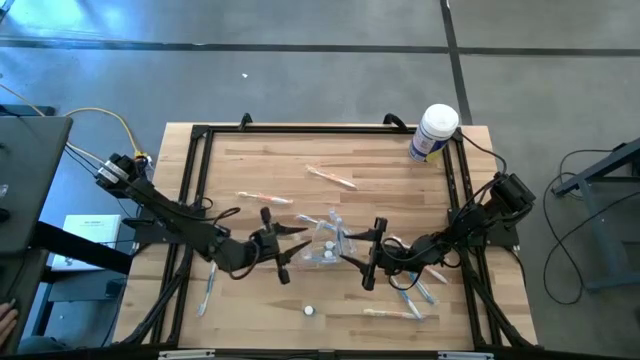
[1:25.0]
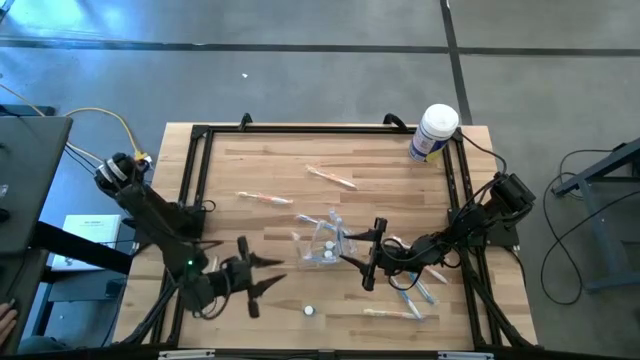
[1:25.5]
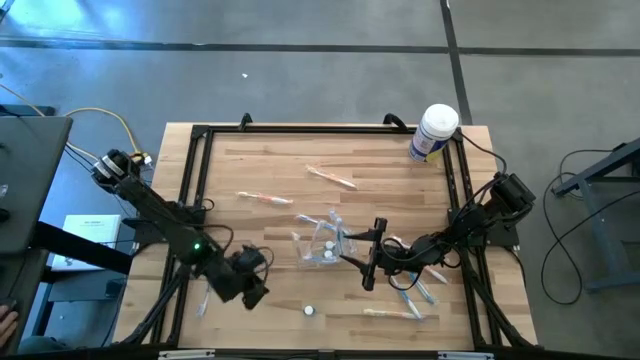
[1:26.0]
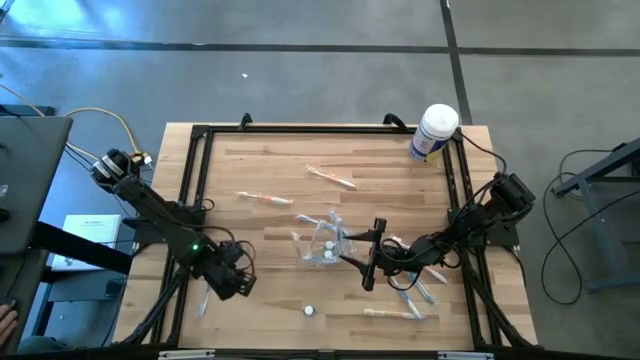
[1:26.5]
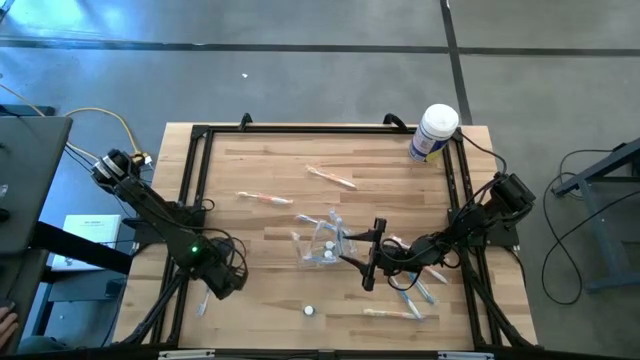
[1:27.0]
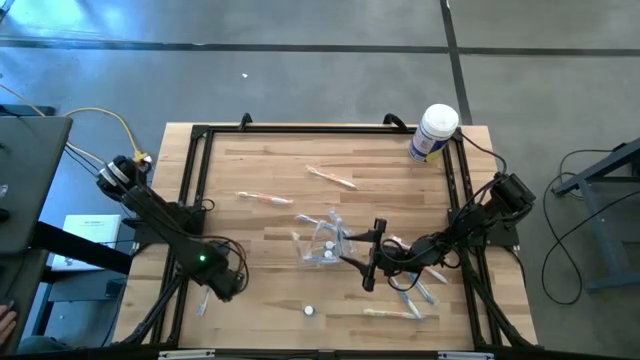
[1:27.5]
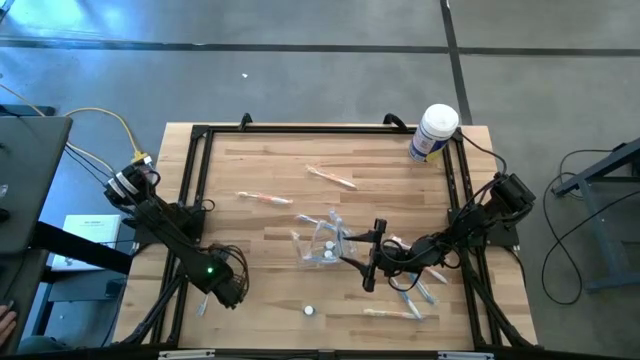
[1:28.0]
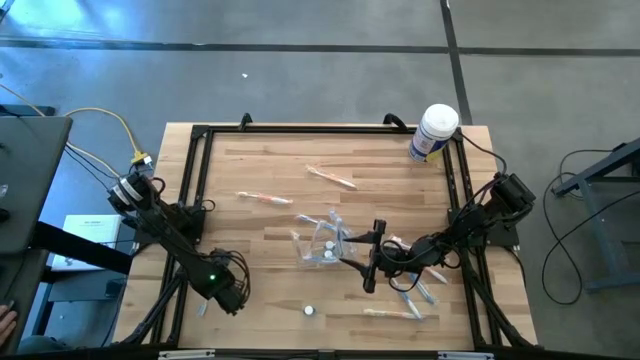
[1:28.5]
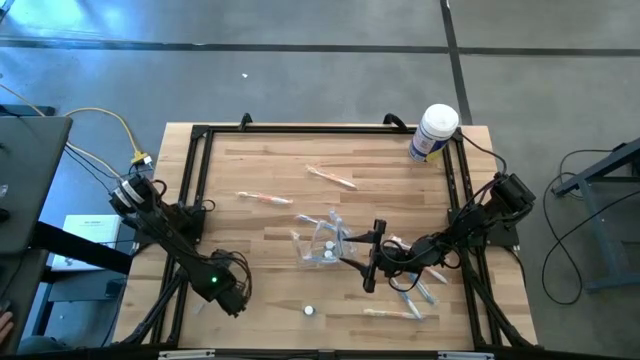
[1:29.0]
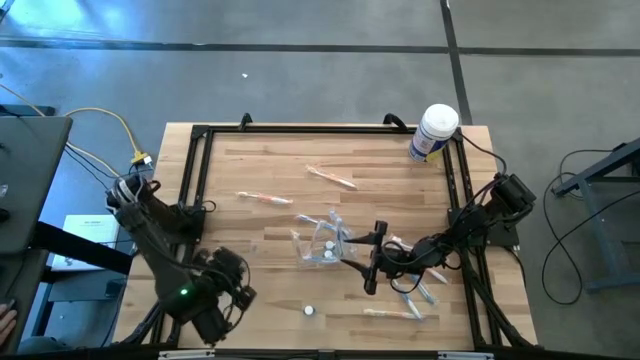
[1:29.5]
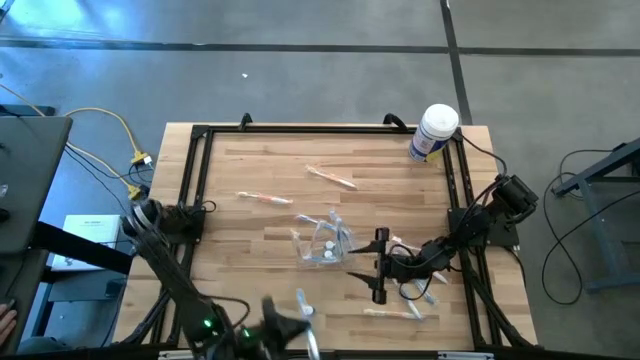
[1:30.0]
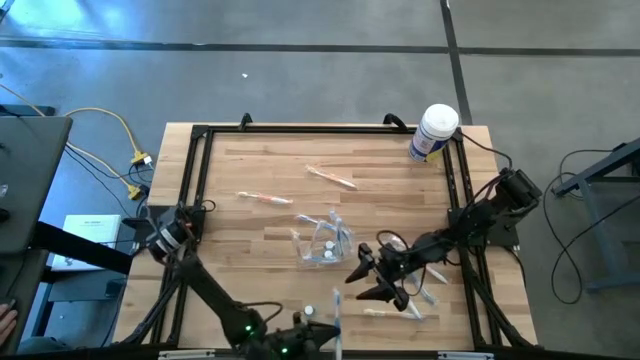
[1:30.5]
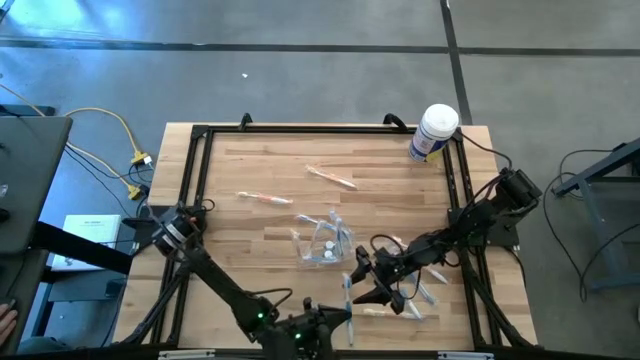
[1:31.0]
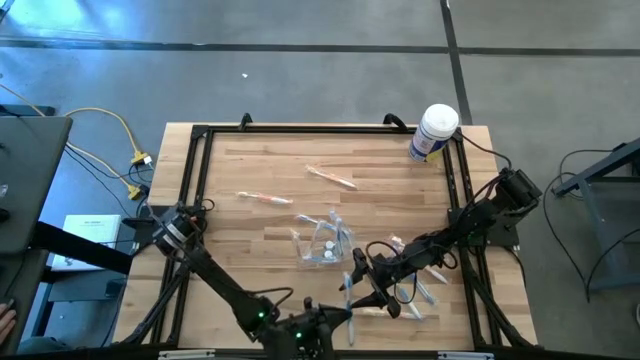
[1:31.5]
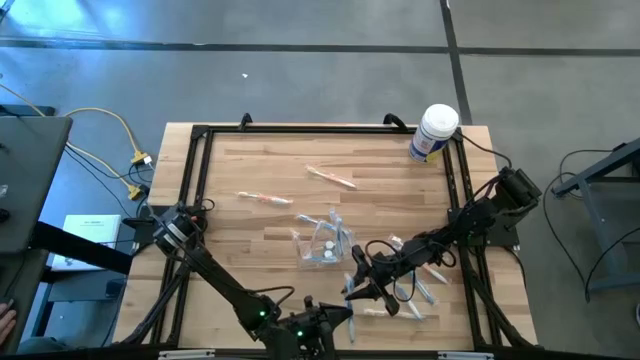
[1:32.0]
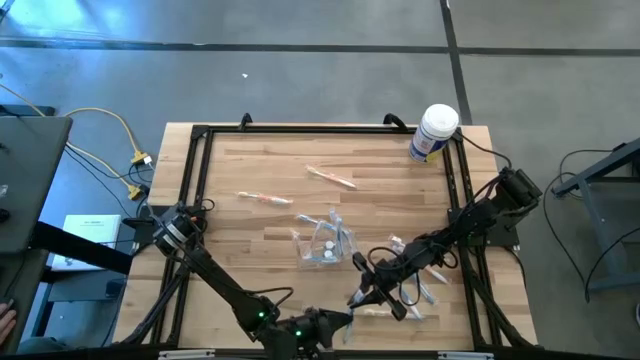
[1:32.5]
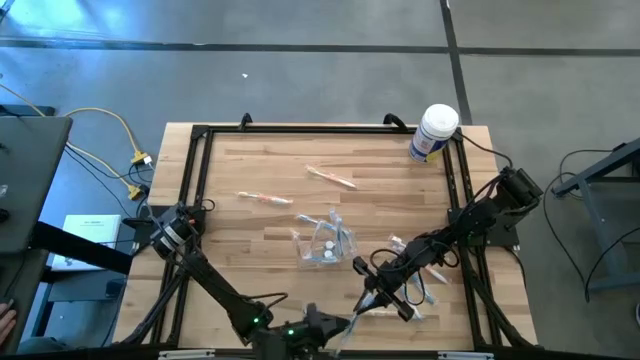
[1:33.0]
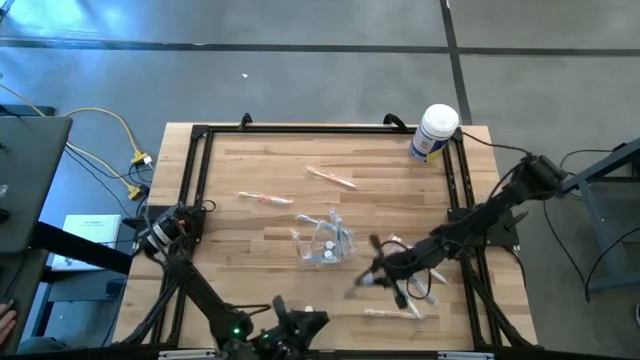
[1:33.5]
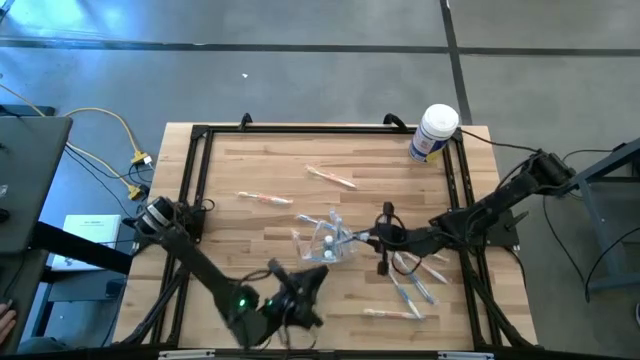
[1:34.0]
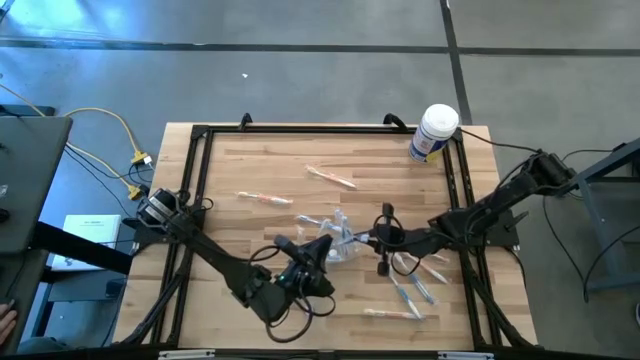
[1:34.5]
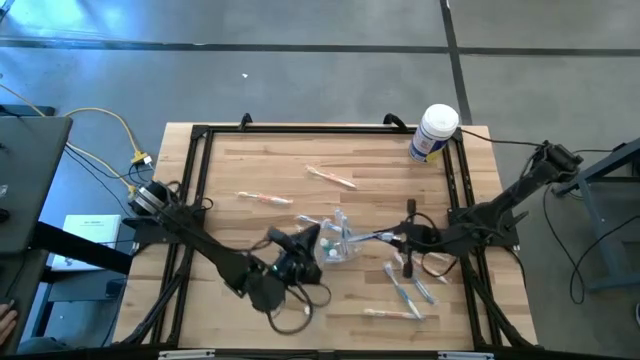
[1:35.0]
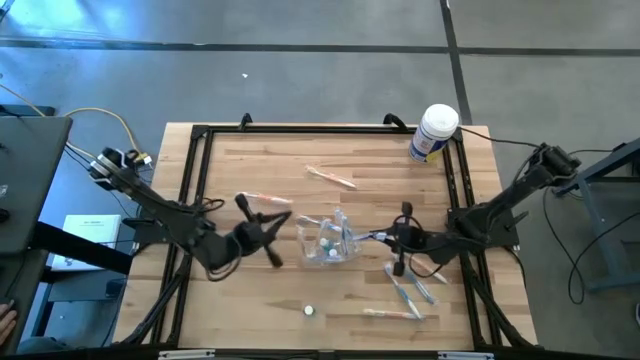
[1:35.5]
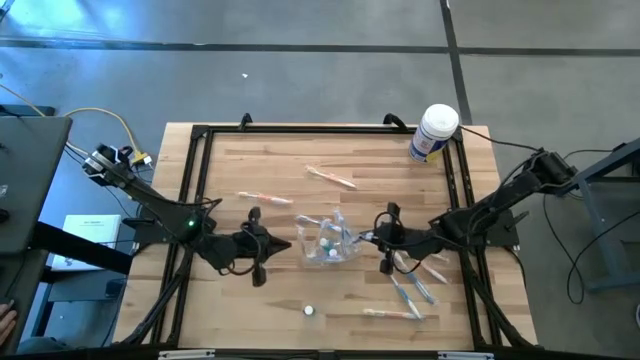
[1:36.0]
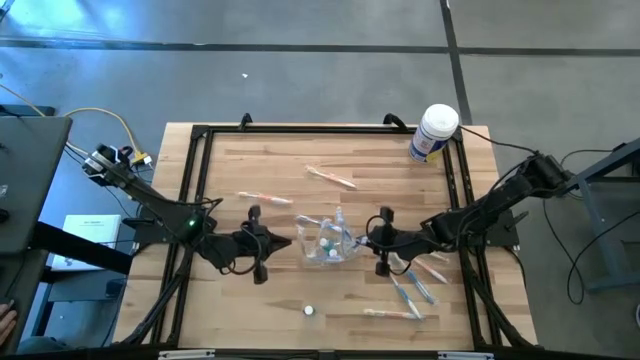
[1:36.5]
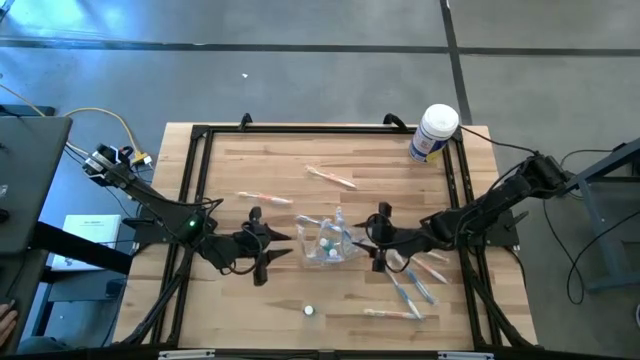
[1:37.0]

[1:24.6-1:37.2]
Task: Pick & Place toothbrushing station
Put the blue toothbrush into the transparent organizer

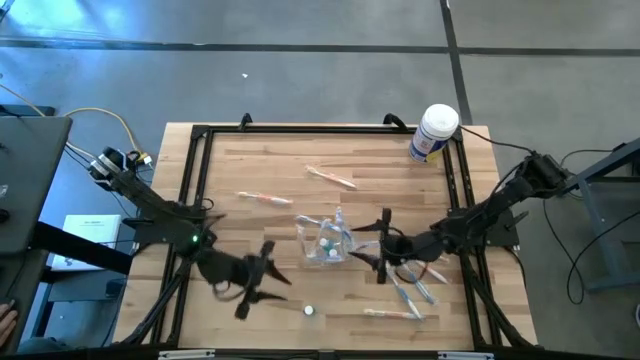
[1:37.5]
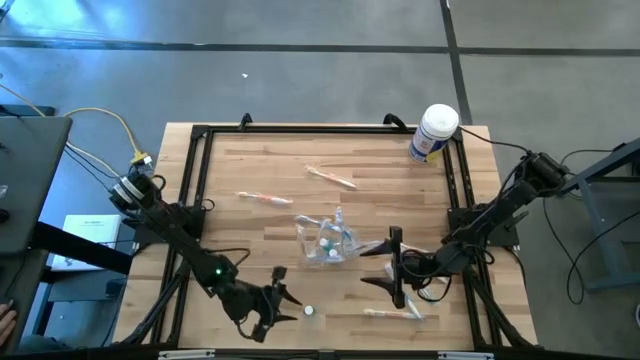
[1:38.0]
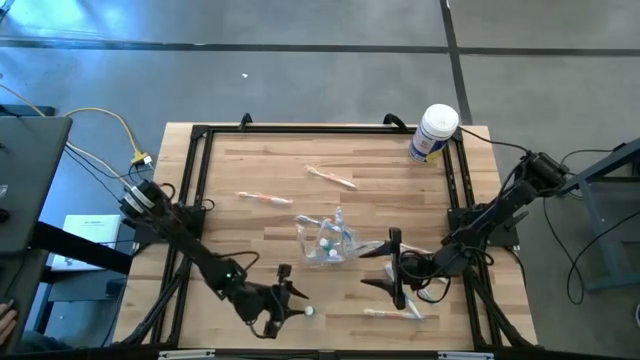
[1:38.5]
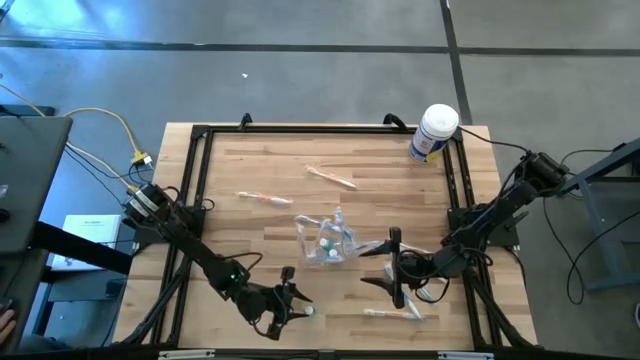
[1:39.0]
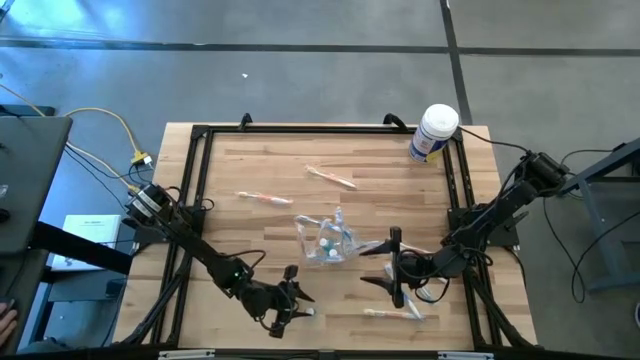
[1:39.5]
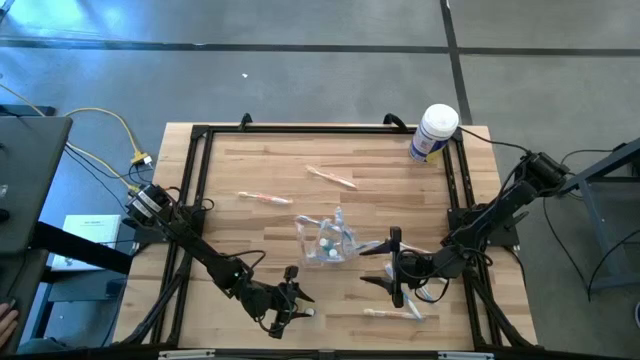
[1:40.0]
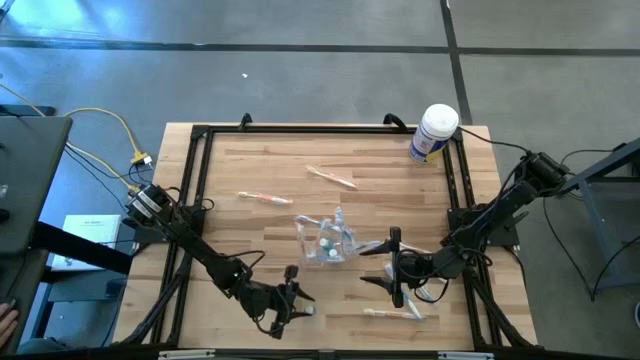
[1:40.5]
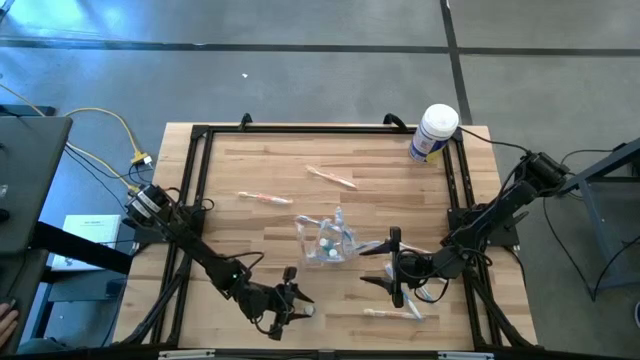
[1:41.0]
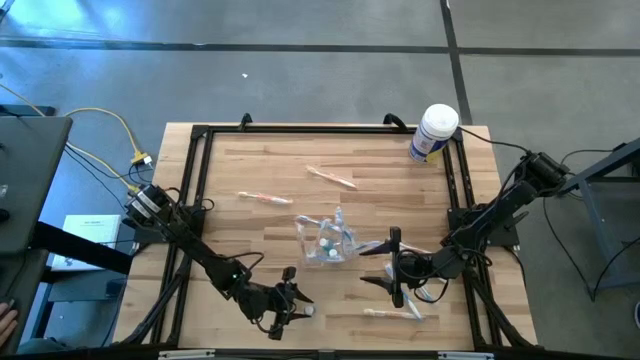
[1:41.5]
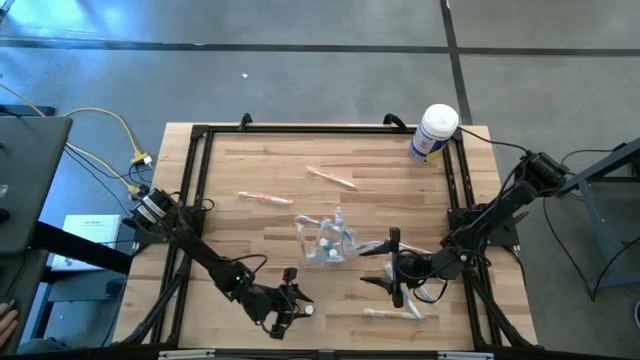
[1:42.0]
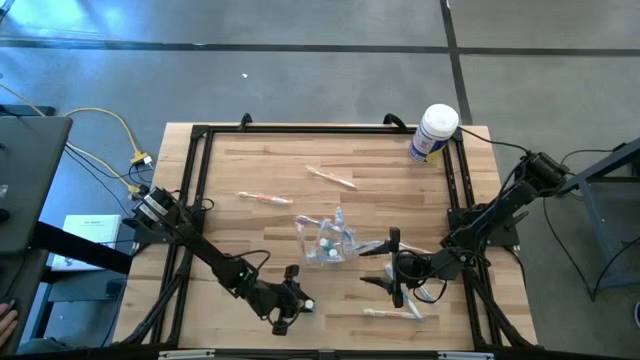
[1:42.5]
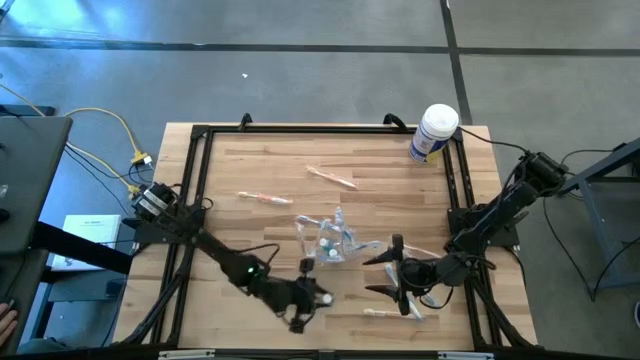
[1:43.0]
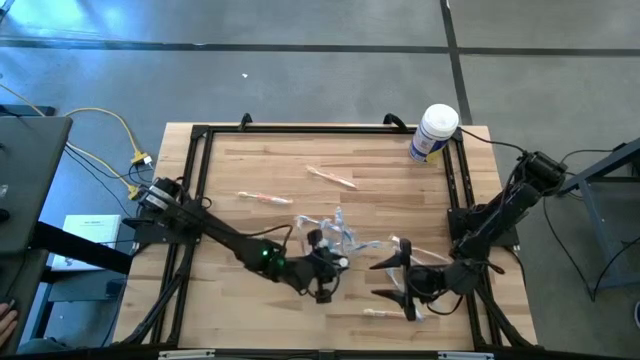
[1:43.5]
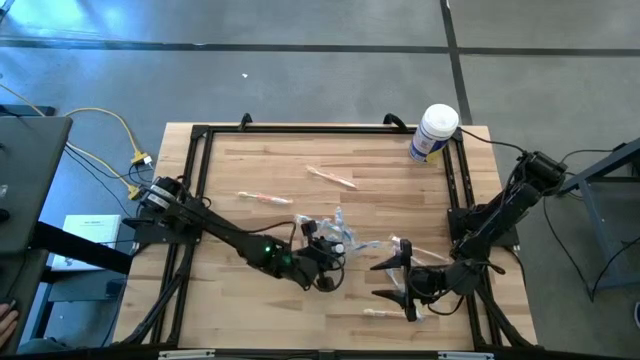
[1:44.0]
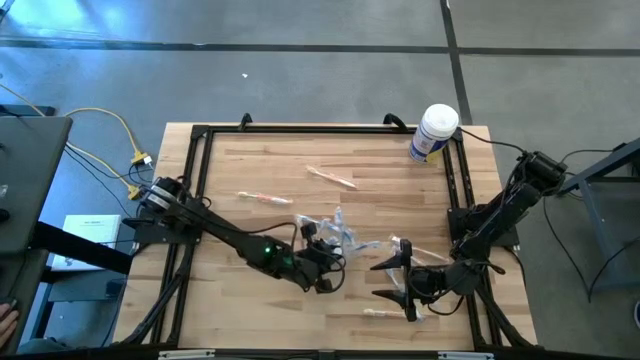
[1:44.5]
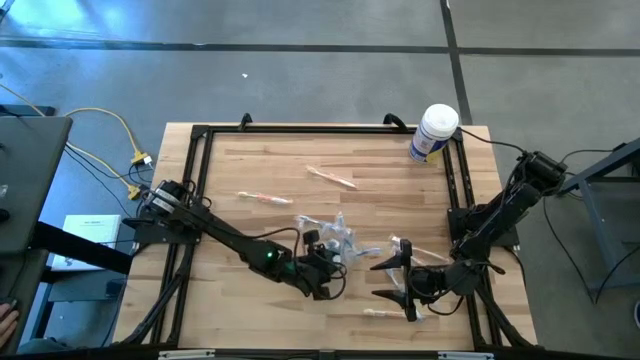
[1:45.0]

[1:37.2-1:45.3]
Put the blue mouthwash into the transparent organizer

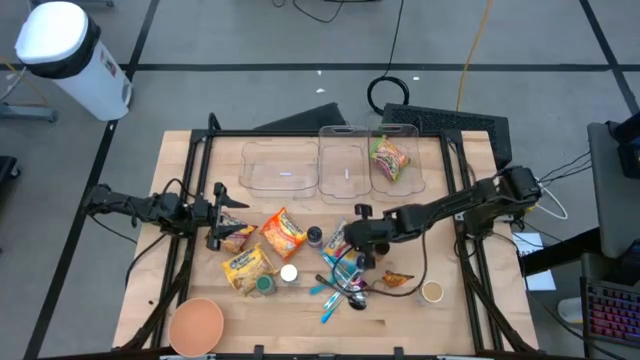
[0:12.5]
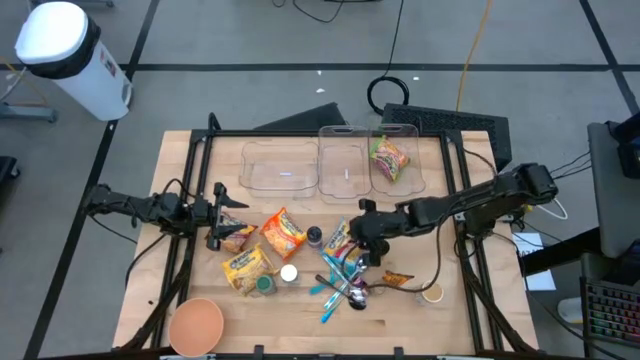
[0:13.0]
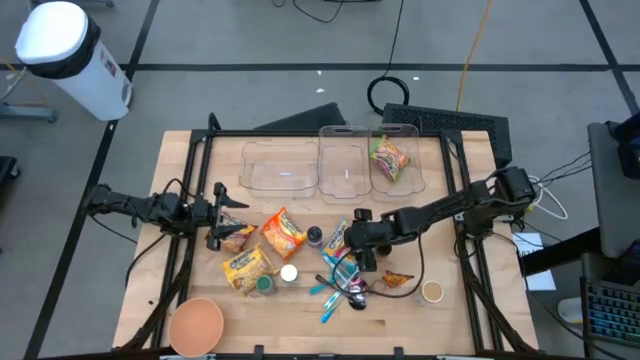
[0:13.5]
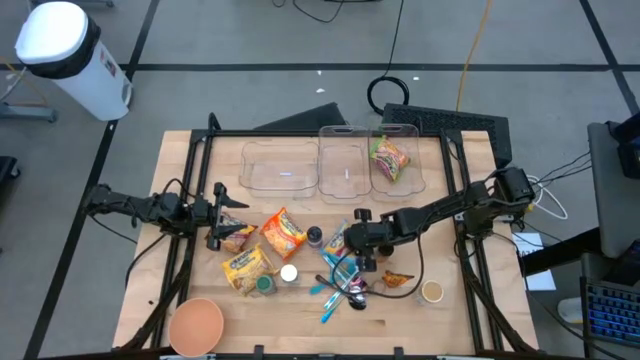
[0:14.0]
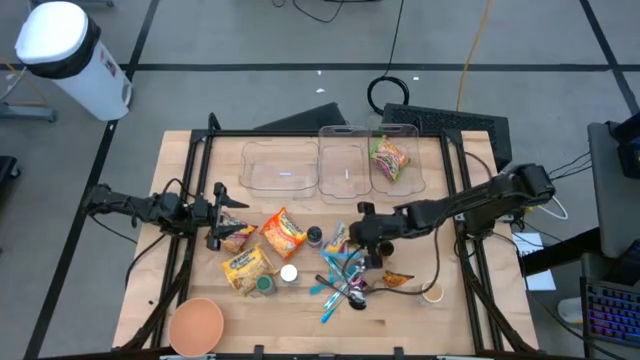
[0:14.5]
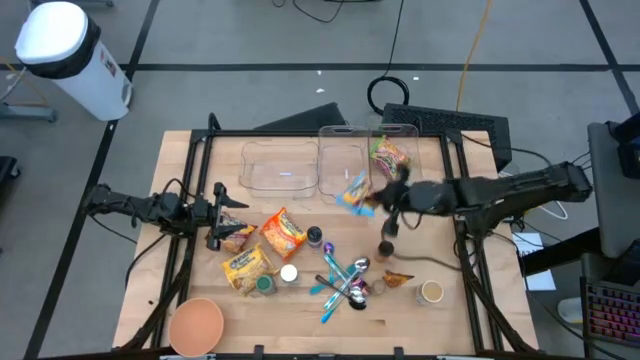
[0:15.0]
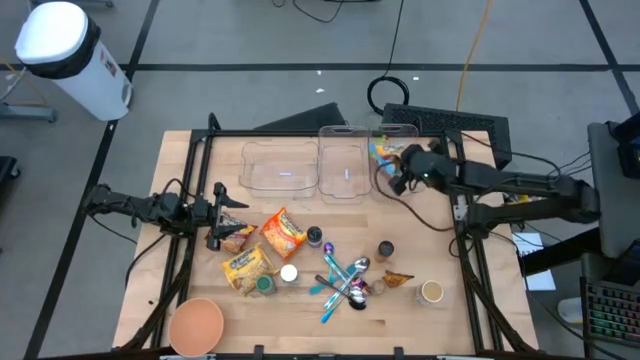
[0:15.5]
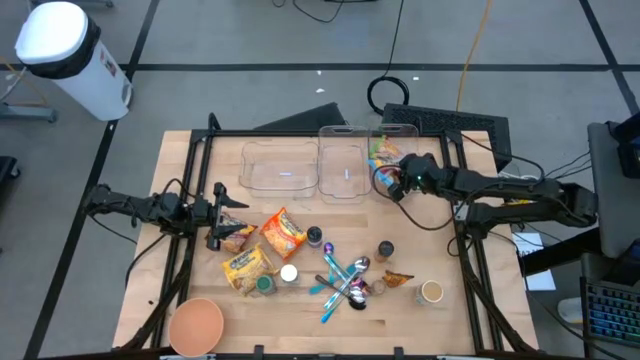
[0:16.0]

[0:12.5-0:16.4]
Task: Pick & Place Food Item
Put the blue noodle pack into the right transparent bin
